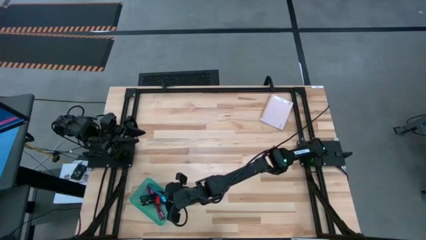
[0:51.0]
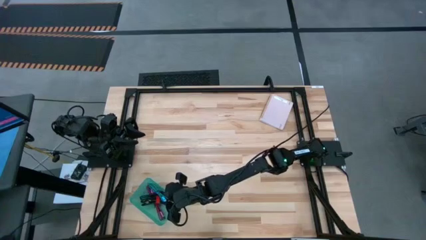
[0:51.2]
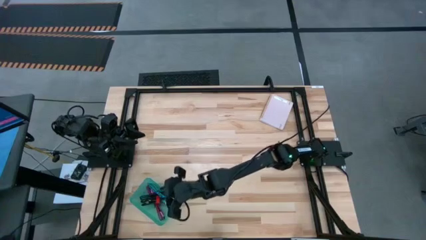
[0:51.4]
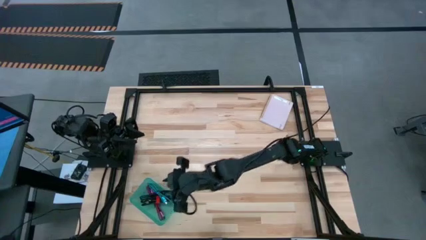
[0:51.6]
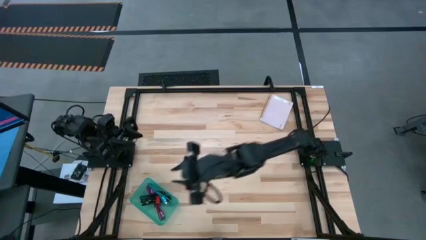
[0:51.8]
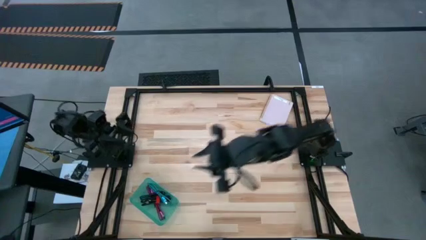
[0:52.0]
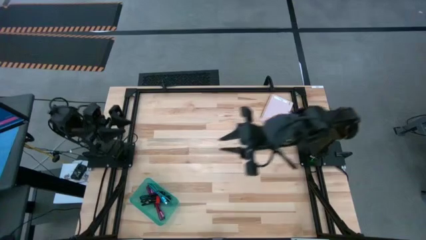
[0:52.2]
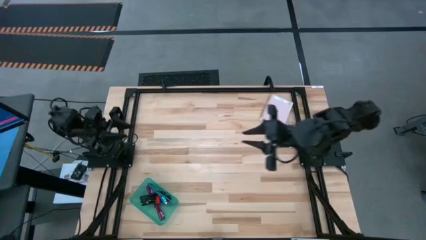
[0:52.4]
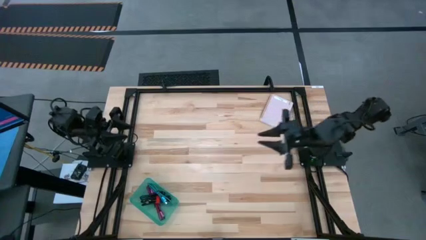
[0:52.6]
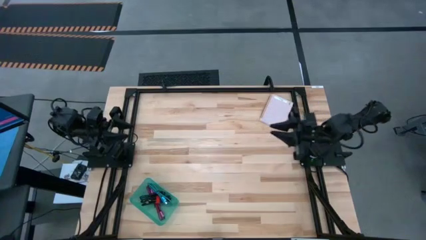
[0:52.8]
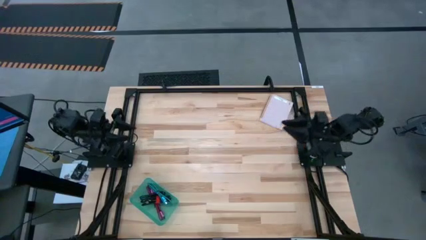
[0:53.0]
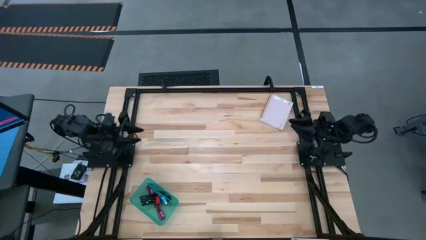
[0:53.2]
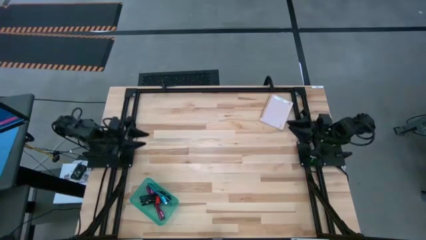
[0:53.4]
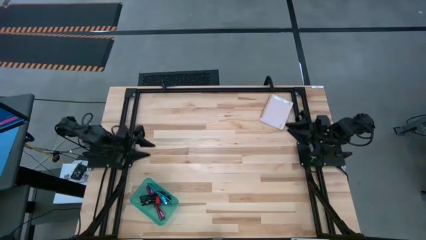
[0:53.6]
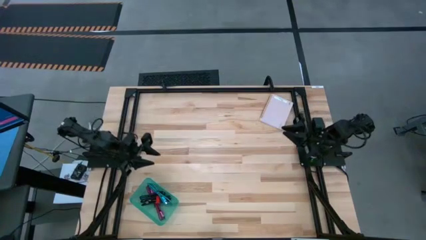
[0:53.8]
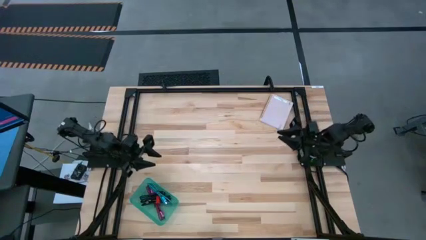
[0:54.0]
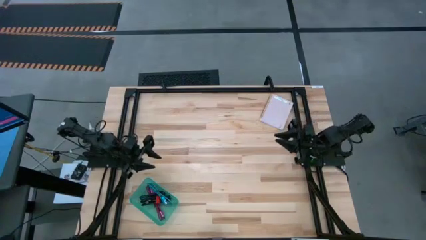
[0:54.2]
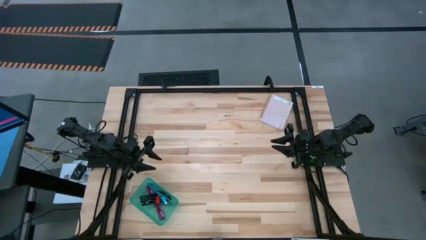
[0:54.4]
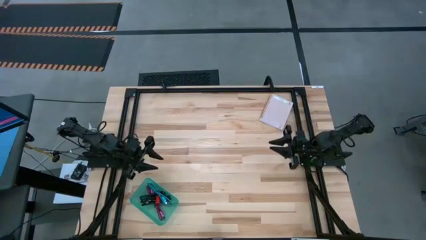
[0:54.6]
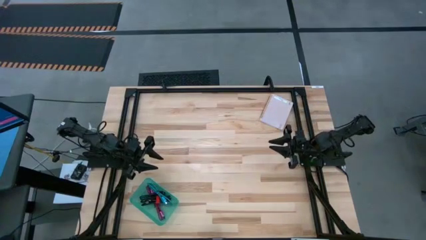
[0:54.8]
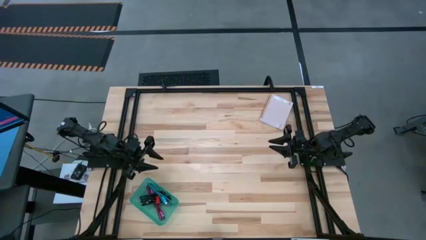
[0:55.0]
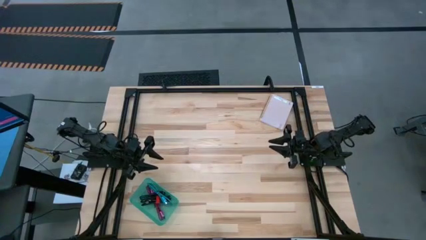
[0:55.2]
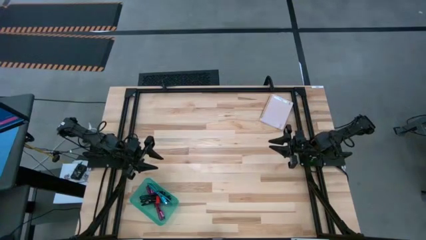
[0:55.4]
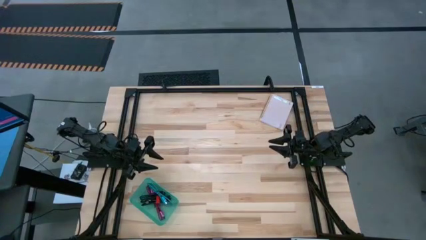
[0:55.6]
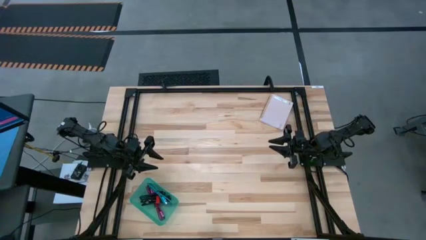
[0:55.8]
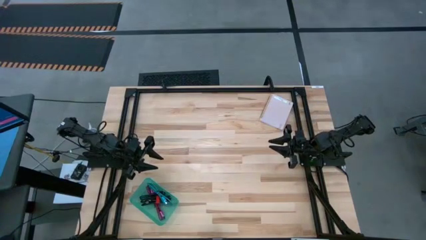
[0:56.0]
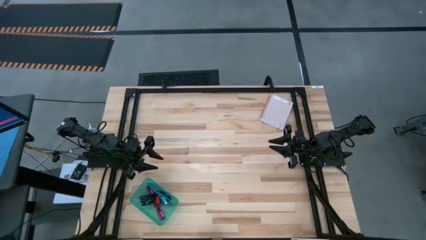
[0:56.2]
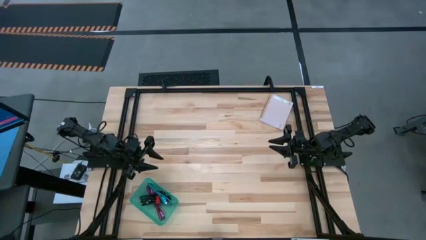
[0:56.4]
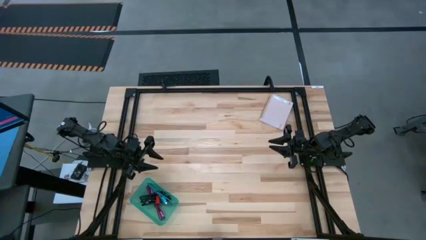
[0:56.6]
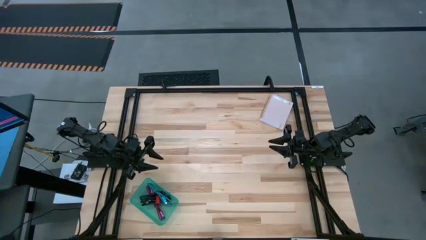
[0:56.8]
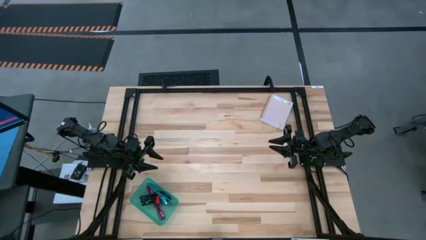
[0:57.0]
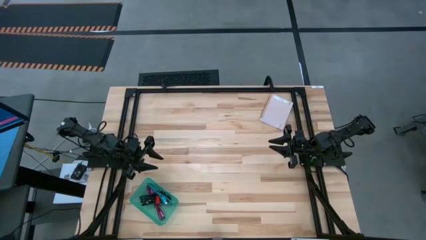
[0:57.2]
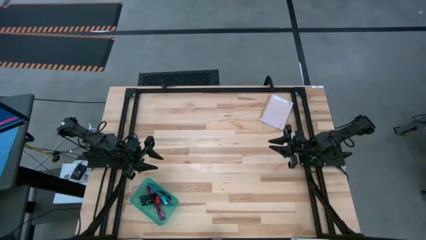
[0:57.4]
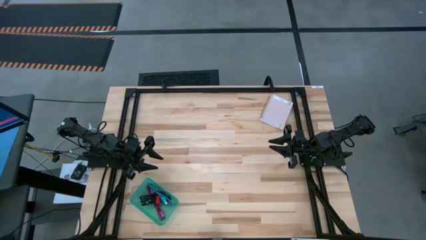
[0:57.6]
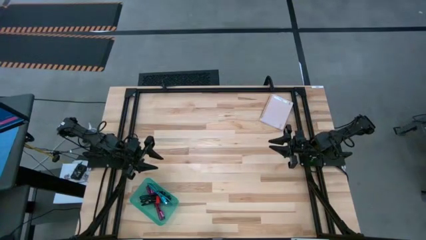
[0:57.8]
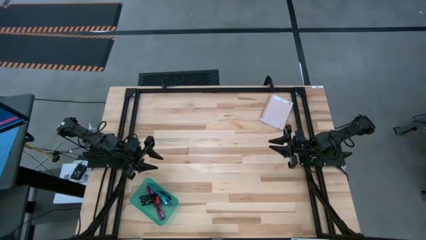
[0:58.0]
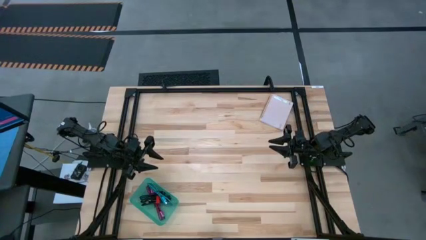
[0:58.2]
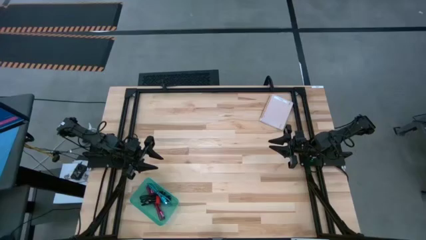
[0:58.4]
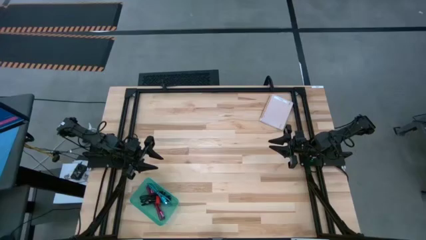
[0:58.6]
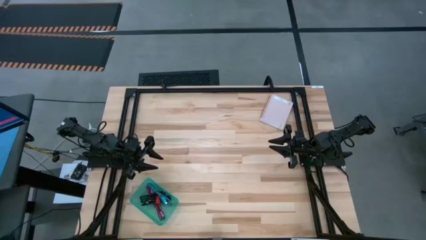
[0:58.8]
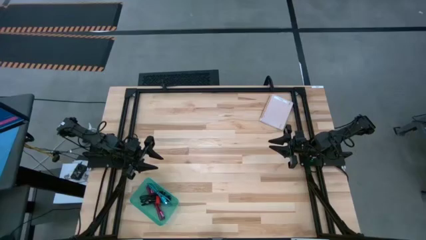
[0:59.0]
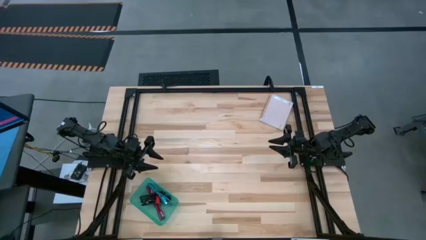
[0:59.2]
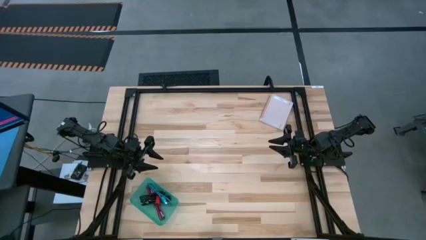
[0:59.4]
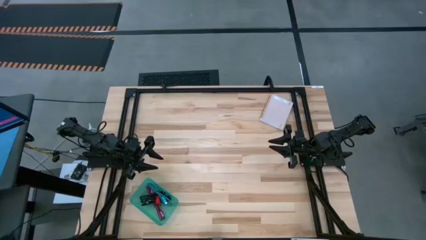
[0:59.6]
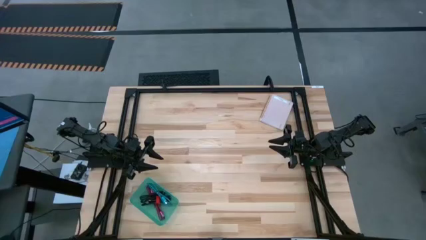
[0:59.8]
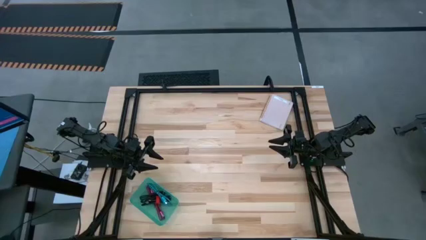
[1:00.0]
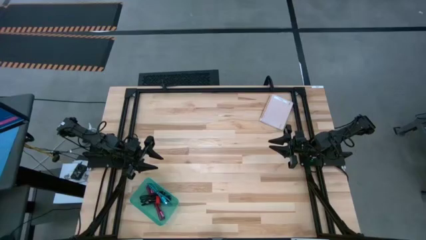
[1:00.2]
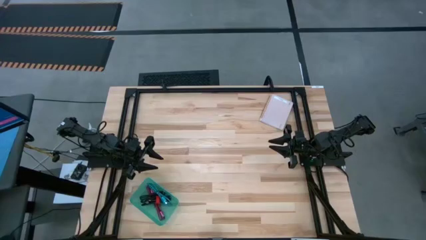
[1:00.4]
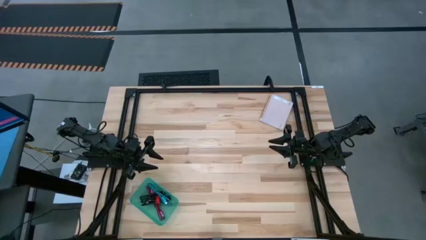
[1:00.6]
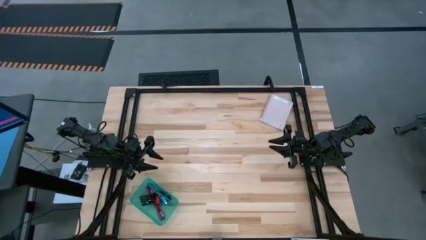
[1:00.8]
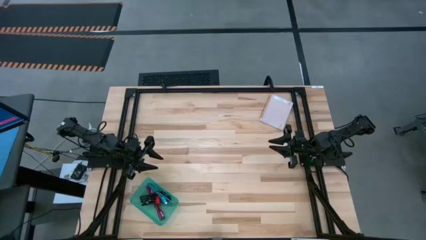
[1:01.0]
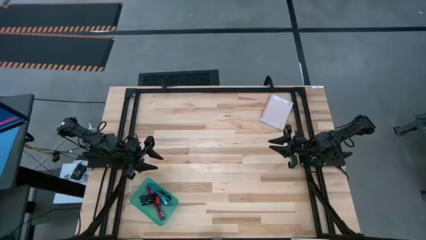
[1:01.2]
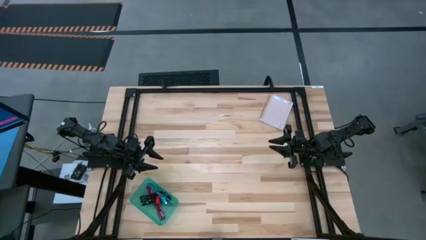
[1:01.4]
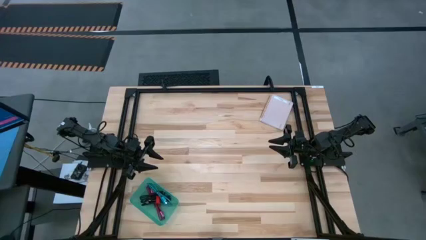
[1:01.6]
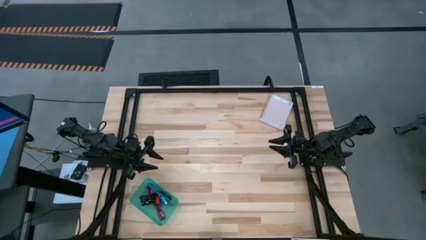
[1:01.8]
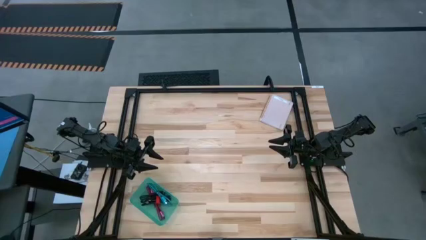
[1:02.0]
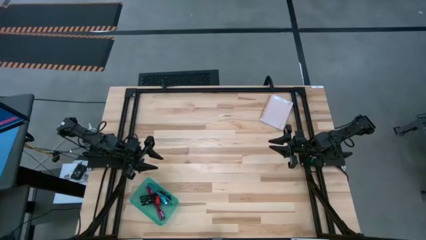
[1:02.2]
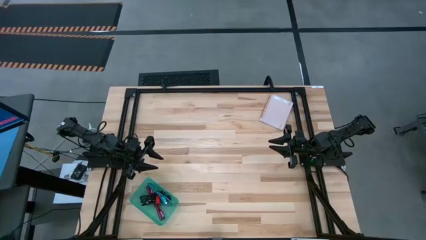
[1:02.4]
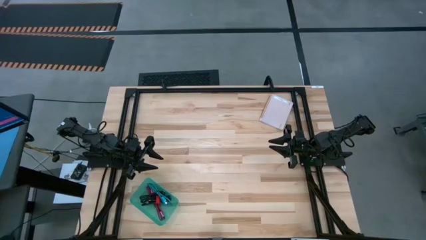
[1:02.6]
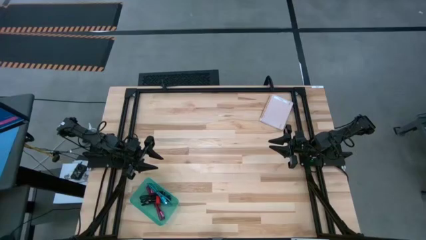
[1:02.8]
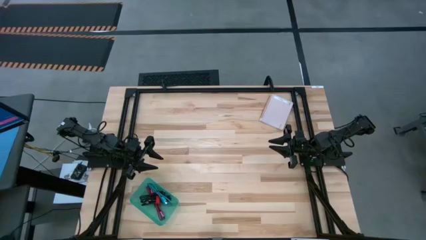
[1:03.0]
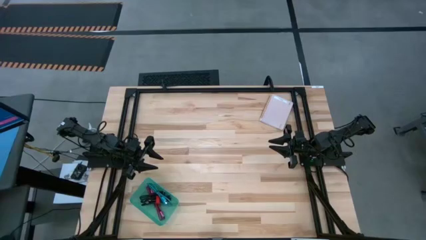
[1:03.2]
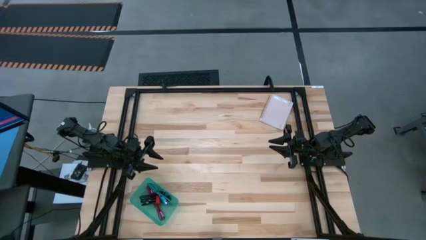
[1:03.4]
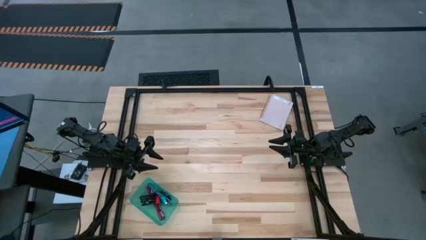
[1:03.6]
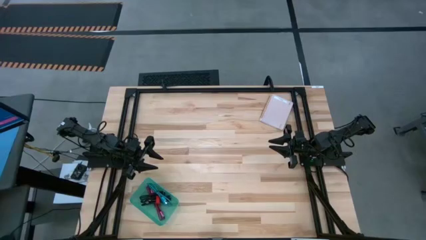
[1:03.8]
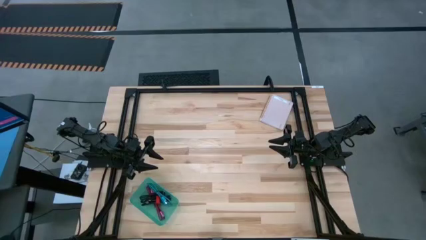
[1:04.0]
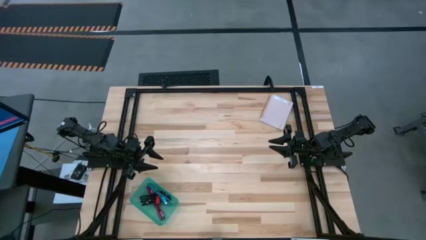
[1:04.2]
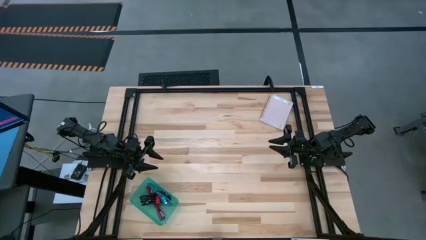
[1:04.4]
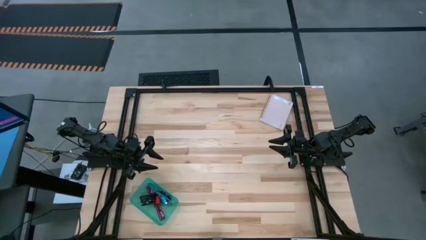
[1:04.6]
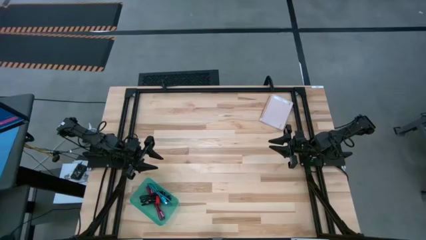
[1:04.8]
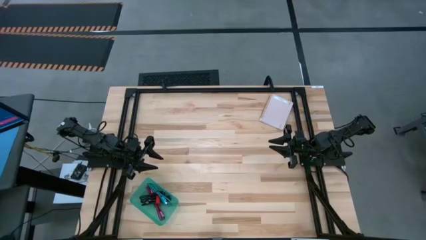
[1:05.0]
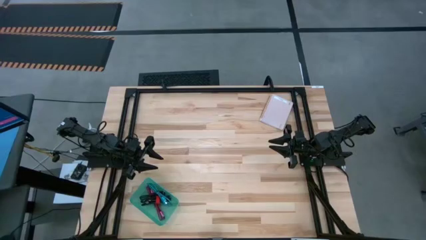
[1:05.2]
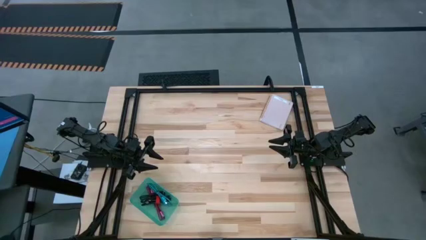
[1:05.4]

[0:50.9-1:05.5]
Task: Pick and place USB-C Cables
Return to Home Position
